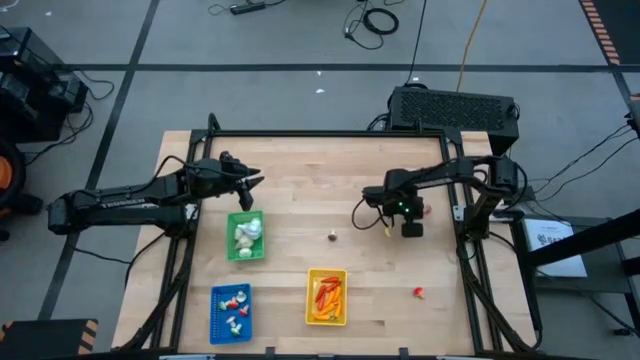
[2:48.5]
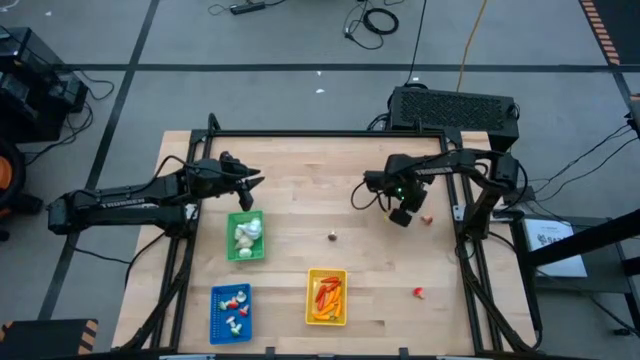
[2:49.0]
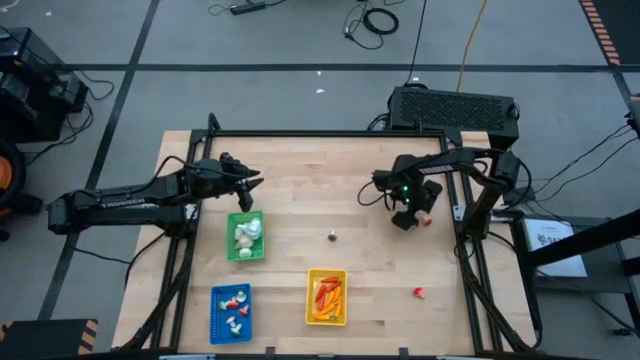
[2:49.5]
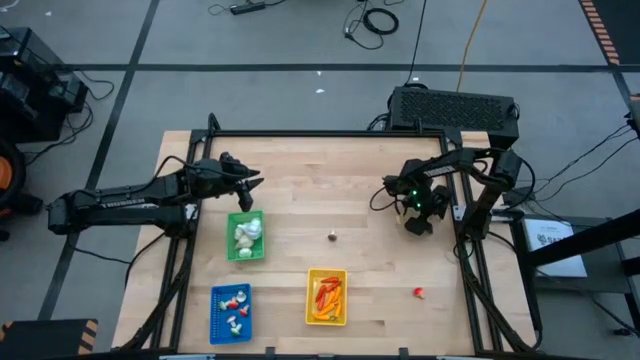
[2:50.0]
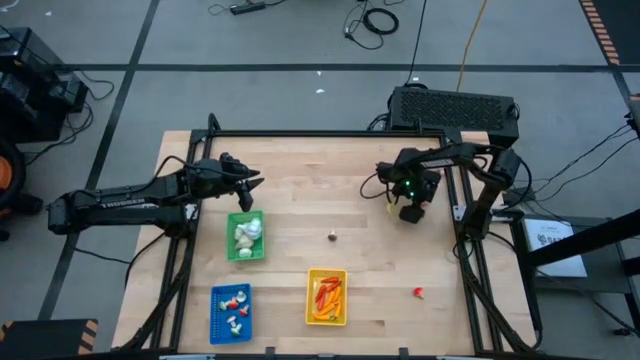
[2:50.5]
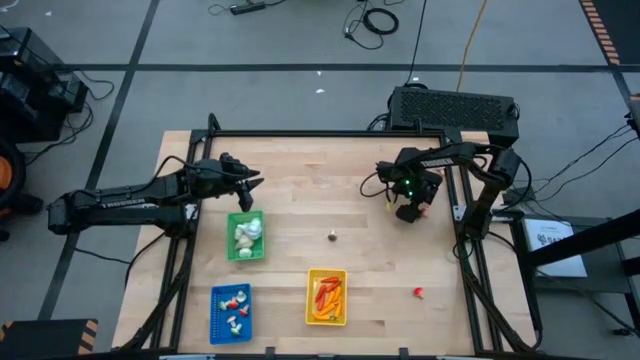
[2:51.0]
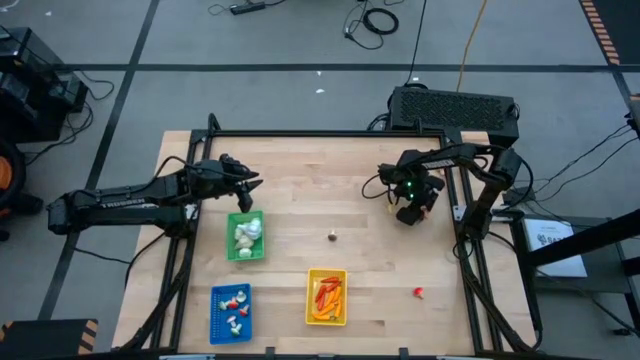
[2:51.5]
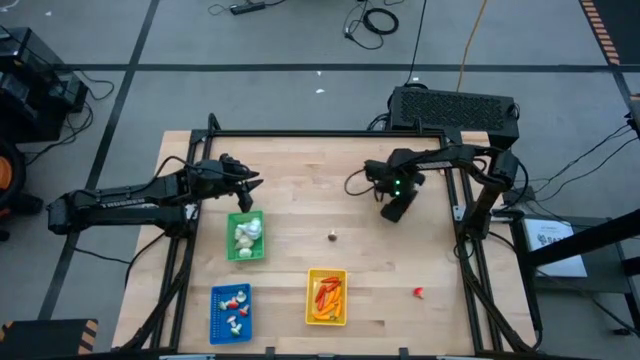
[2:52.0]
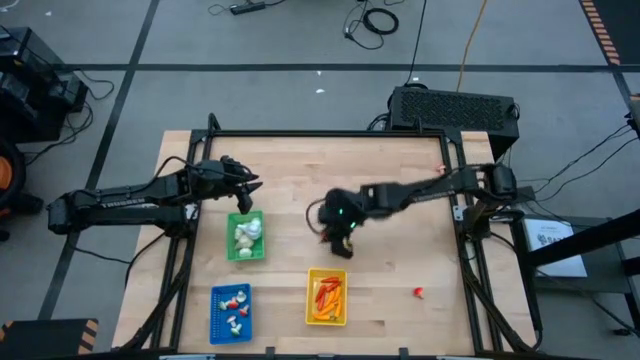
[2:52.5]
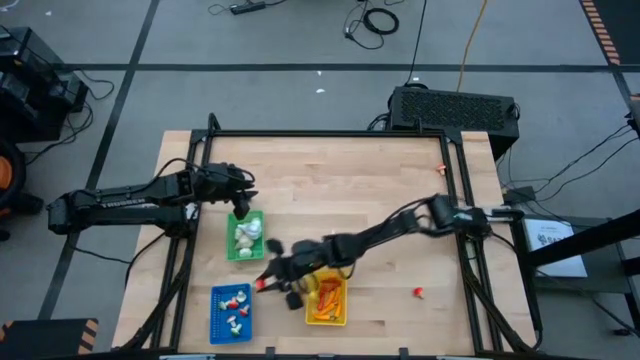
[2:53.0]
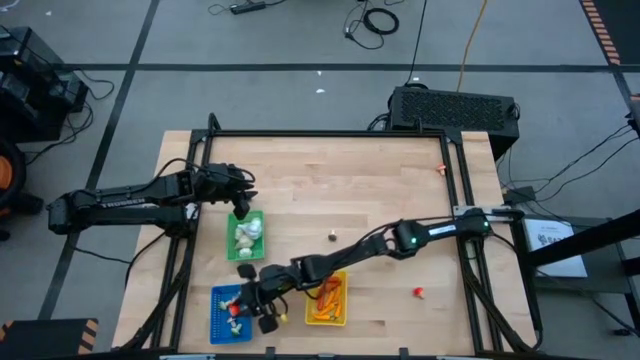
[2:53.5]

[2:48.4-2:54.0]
Task: Sort produce into baskets
Put the red mushroom into the blue basket

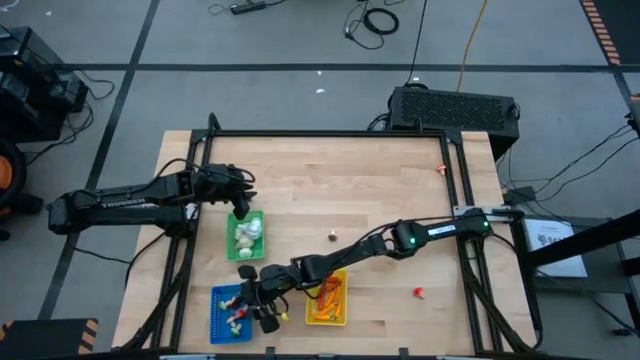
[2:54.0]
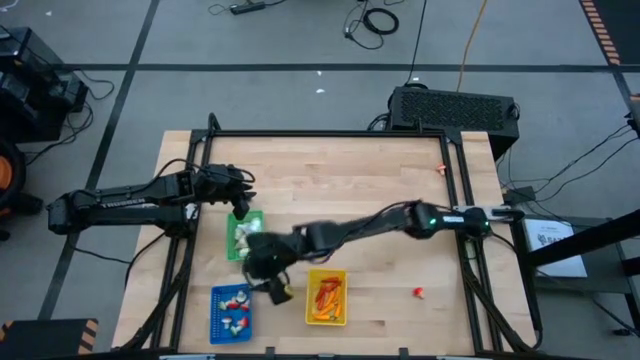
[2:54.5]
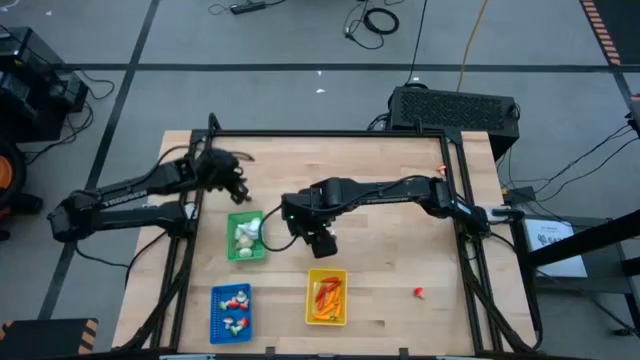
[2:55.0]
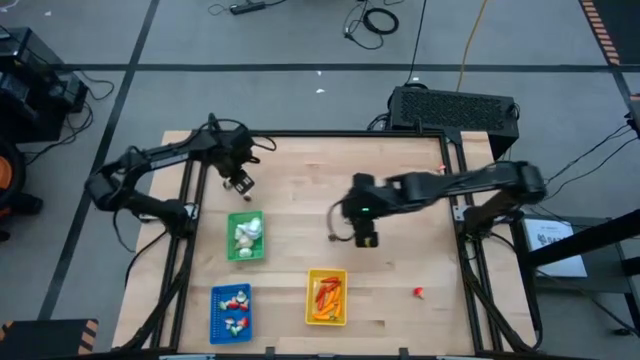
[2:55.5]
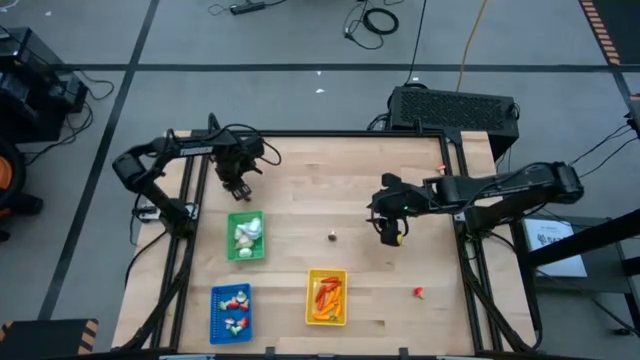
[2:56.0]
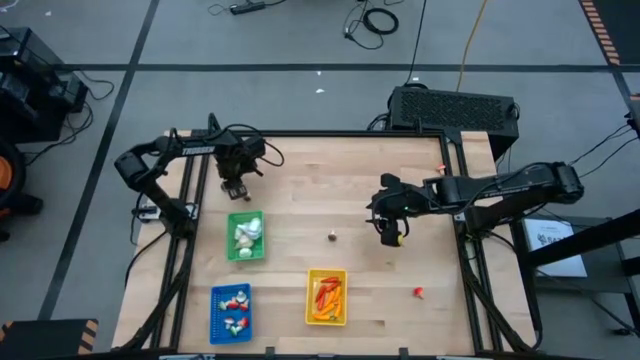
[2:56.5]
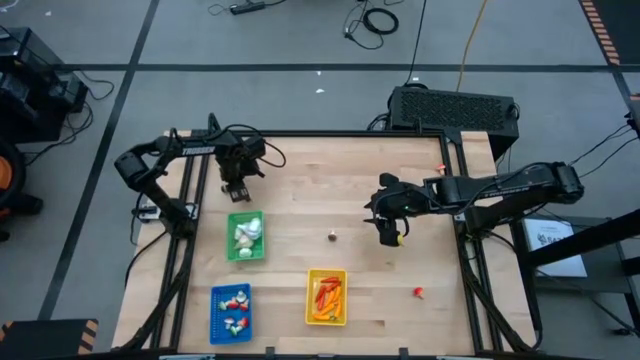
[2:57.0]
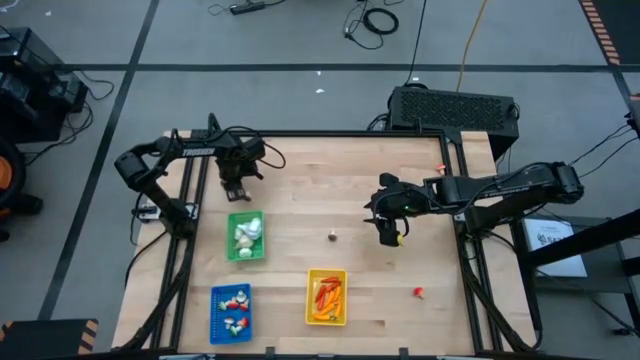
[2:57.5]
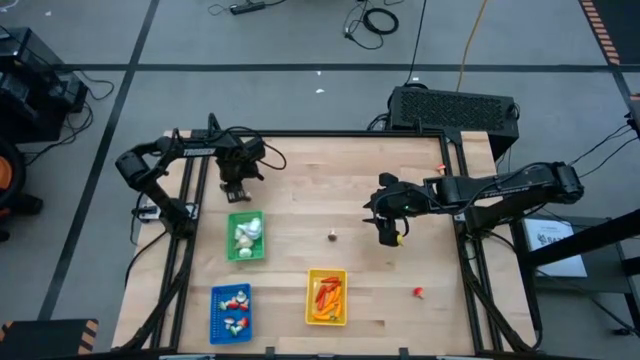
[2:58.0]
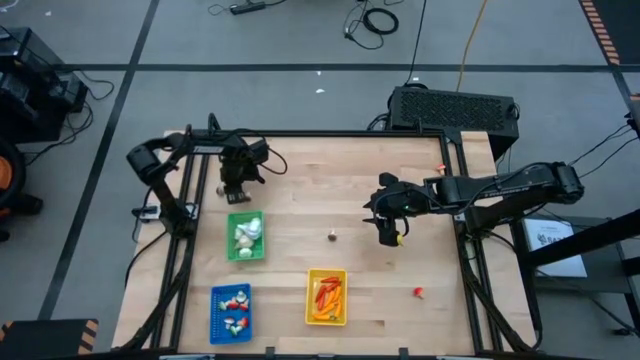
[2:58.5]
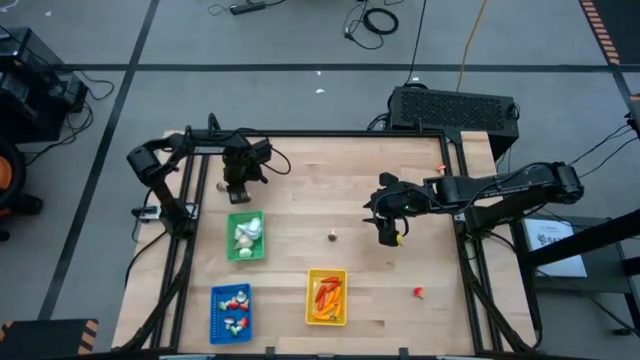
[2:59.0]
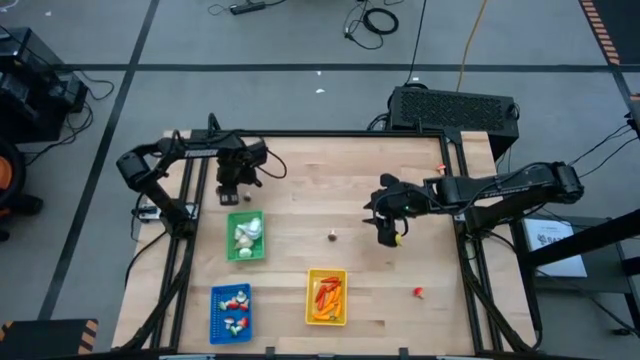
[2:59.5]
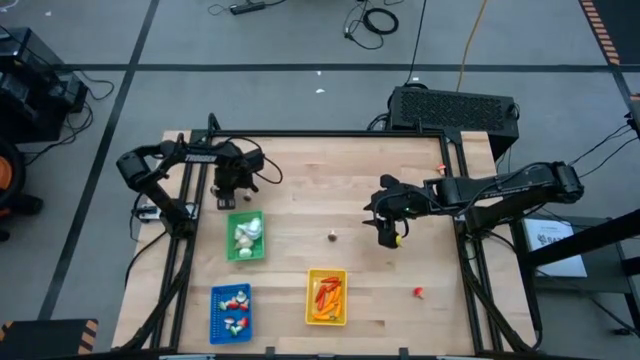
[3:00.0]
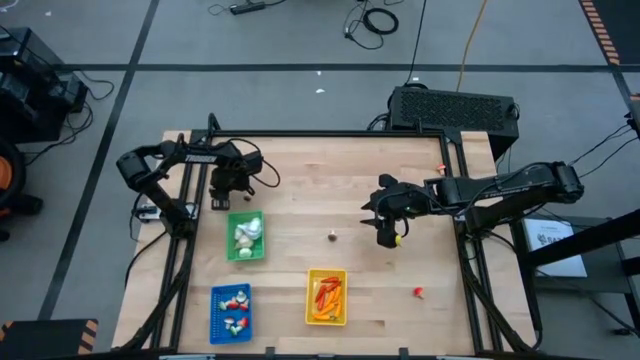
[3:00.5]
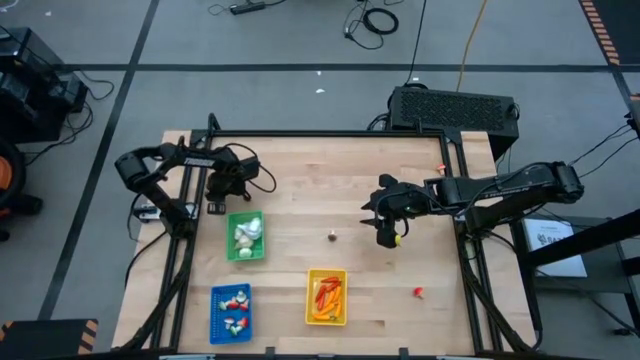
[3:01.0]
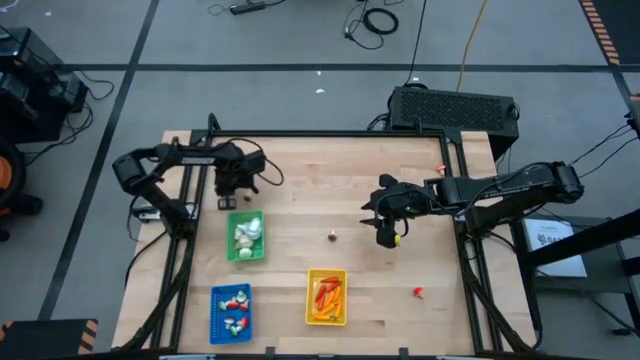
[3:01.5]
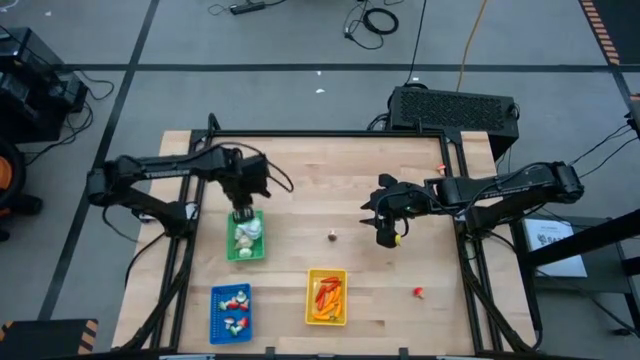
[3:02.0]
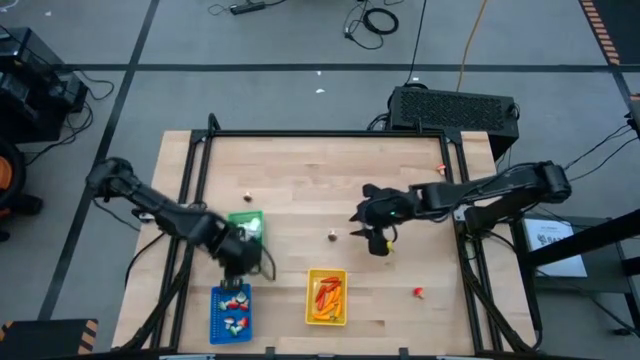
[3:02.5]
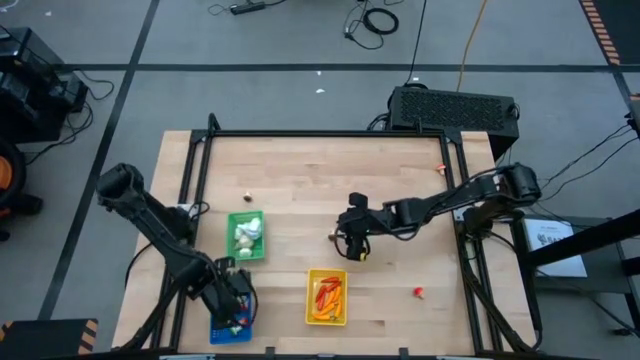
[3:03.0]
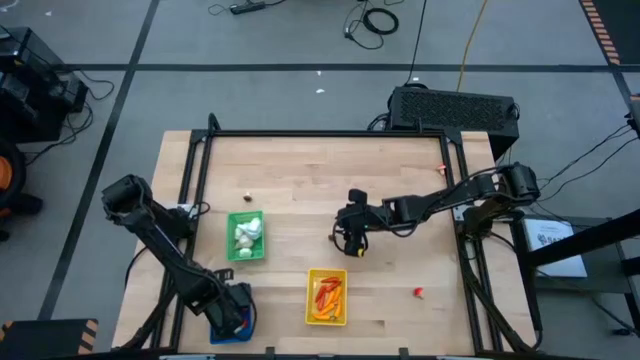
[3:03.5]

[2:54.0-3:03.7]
Put the brown mushroom into the blue basket

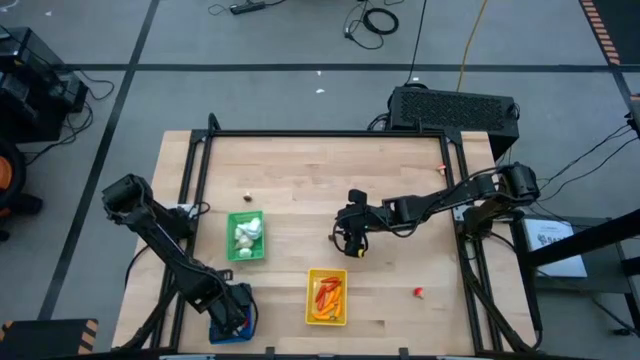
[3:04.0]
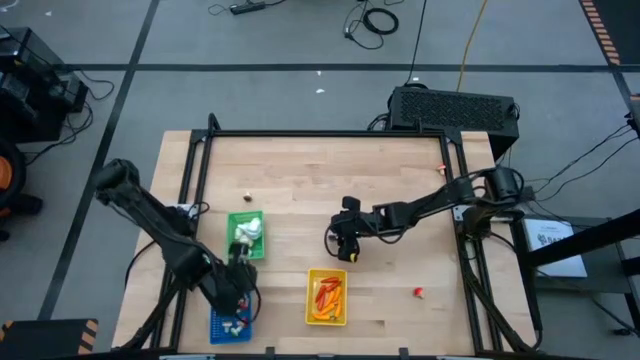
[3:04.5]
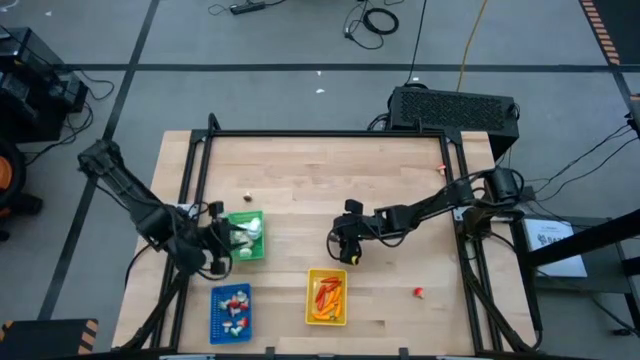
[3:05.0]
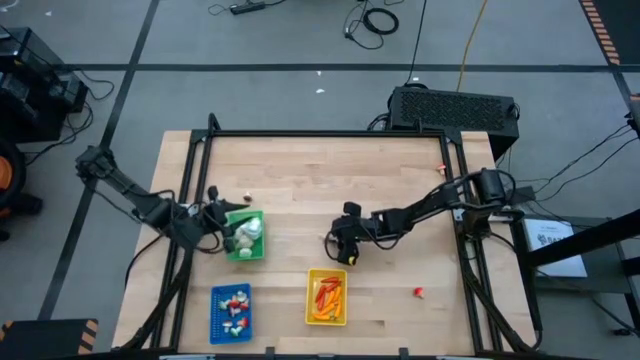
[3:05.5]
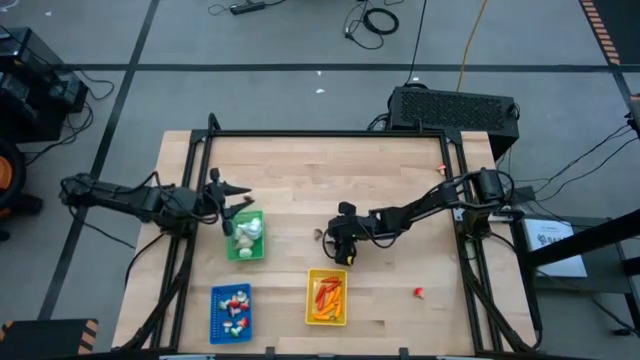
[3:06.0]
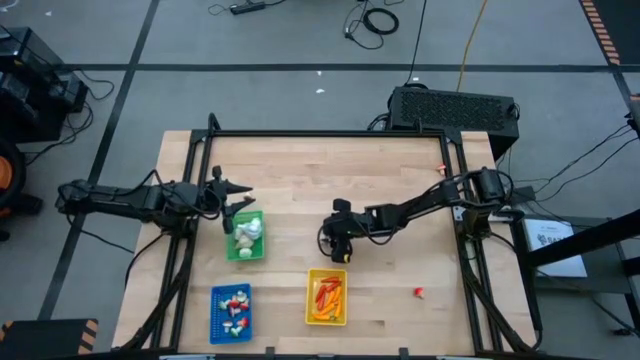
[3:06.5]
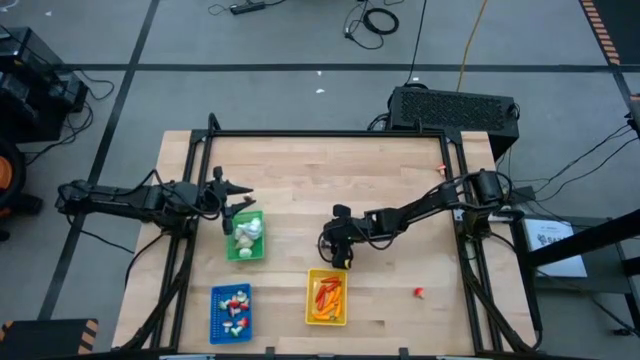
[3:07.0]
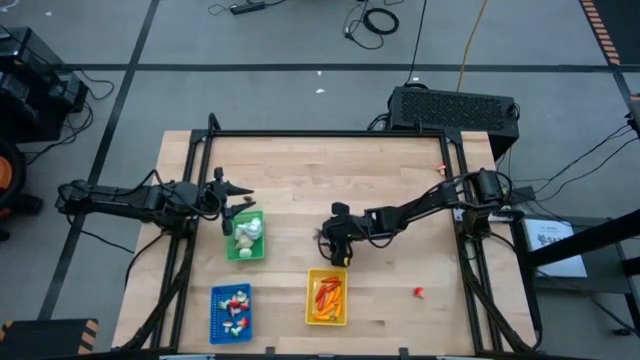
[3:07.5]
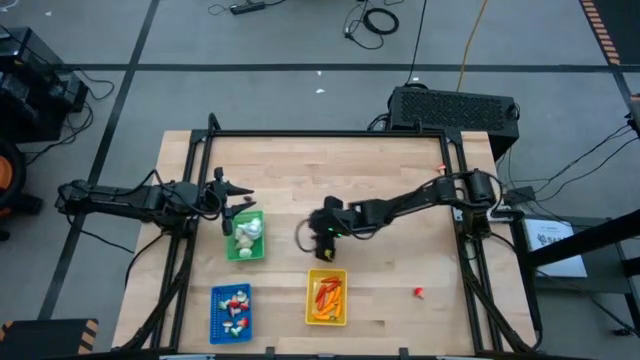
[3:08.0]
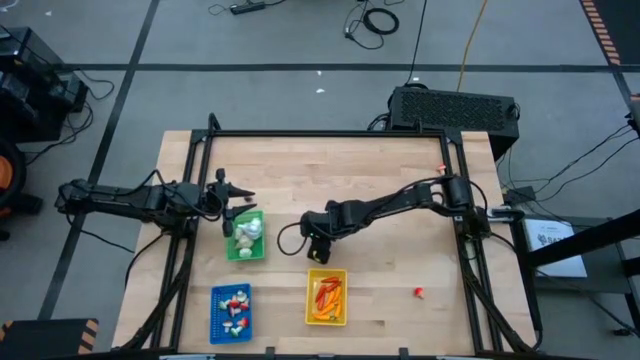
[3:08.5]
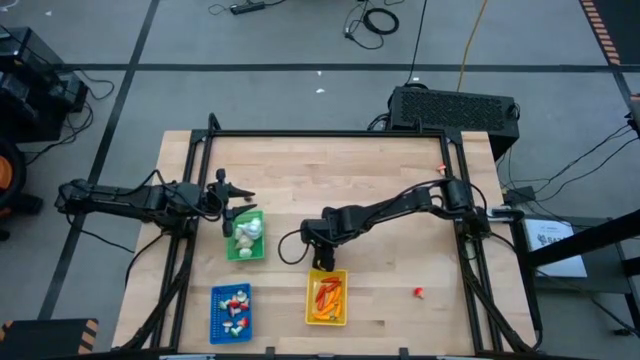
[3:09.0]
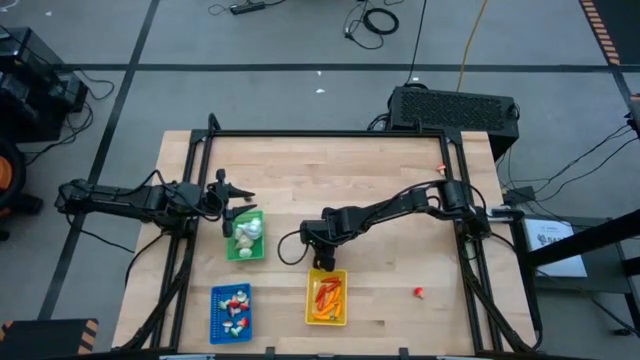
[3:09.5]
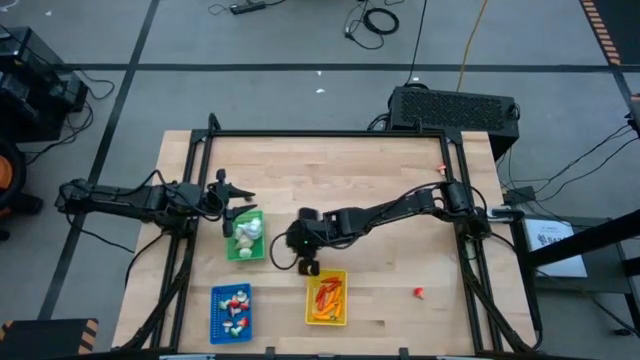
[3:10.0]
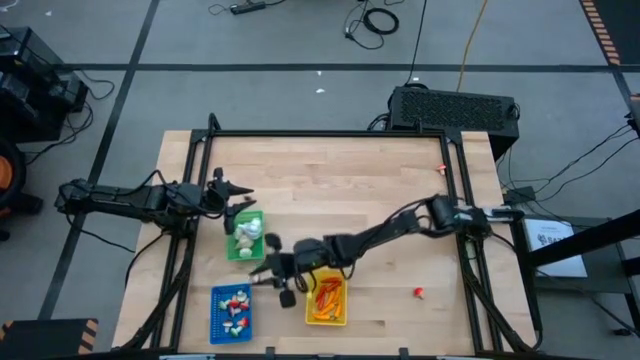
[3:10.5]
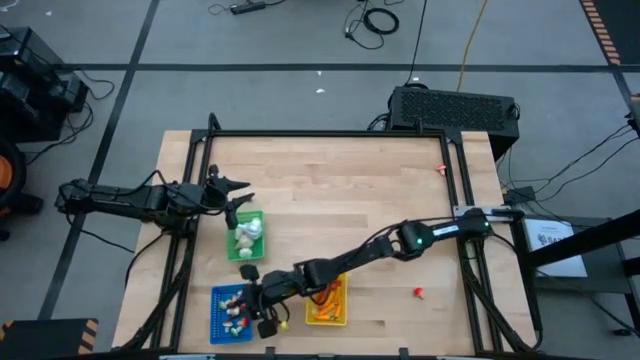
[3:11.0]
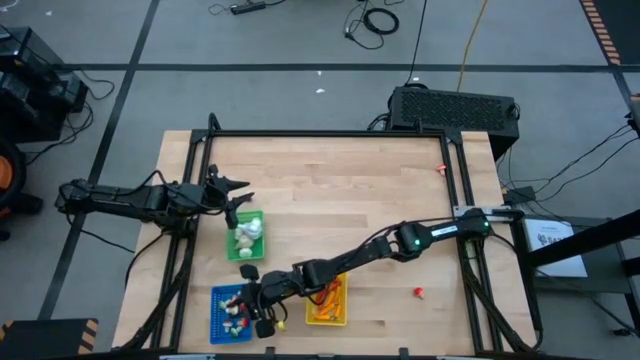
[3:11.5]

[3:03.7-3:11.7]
Put the brown mushroom into the blue basket
